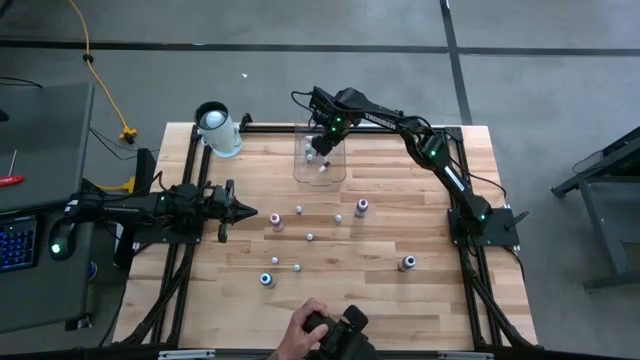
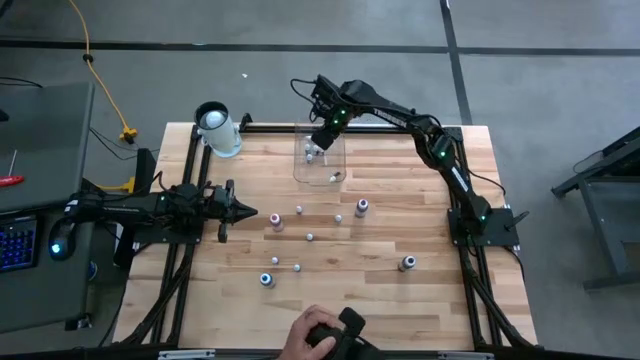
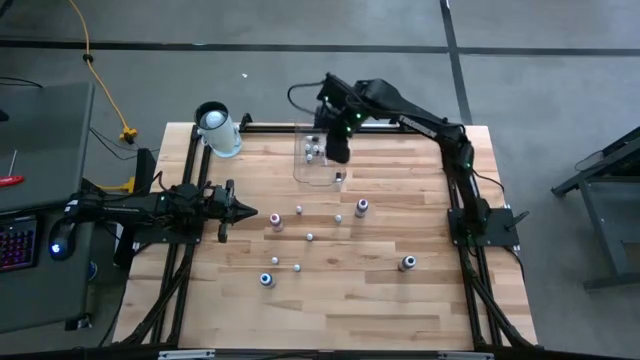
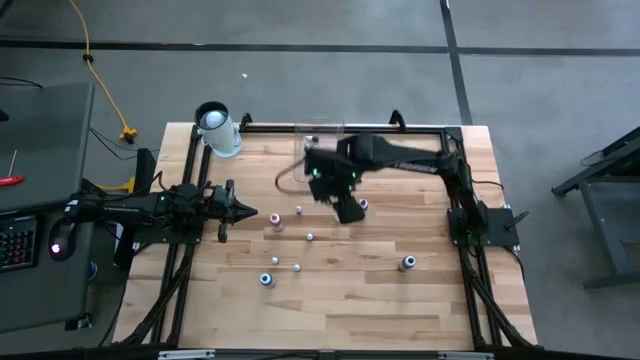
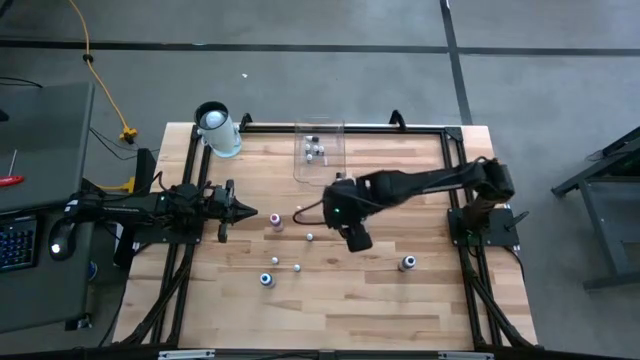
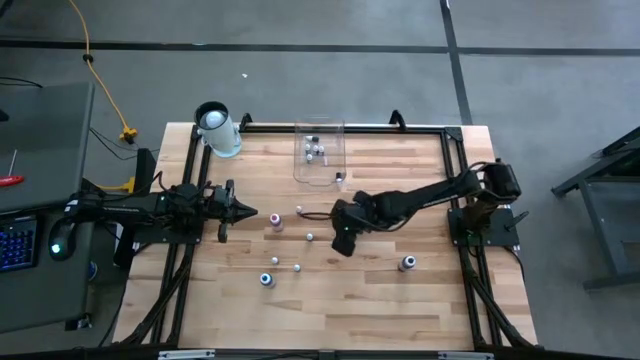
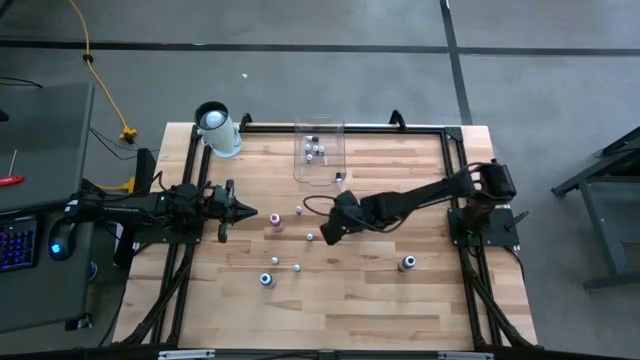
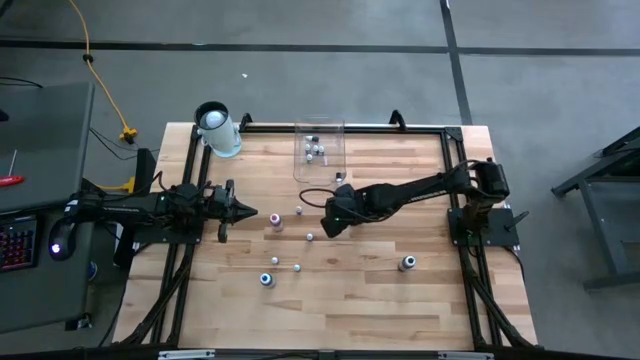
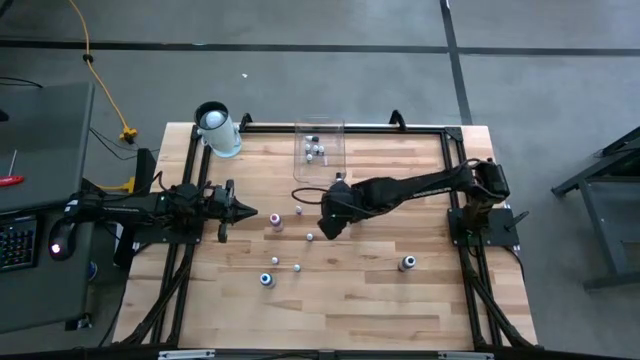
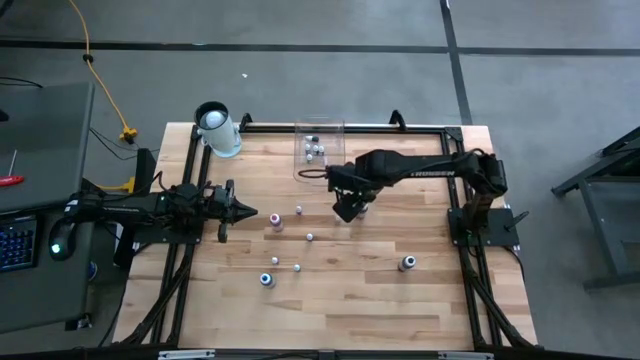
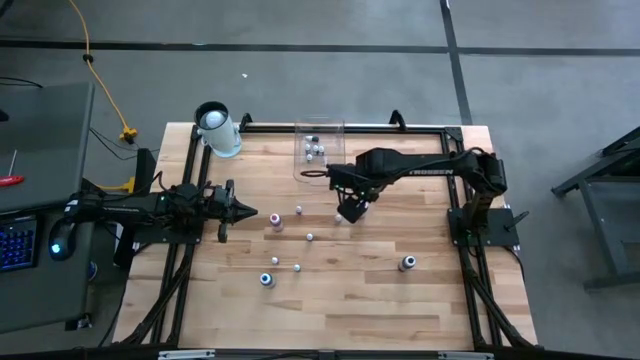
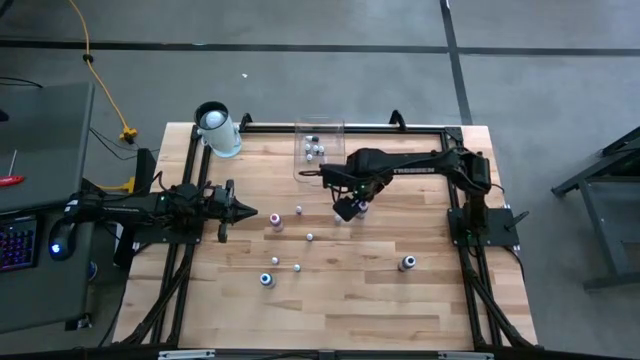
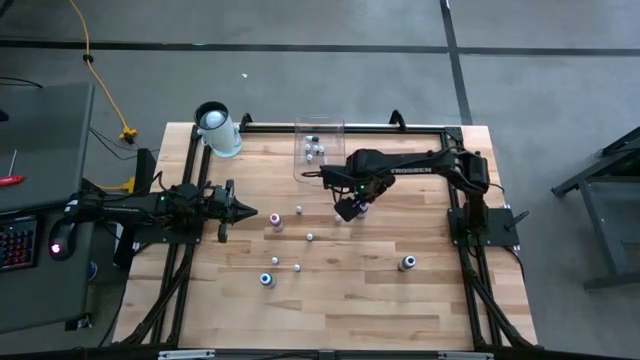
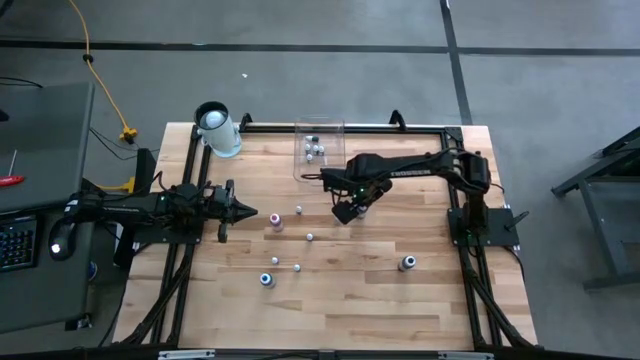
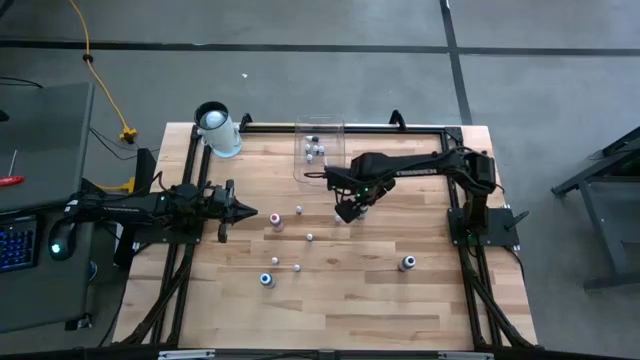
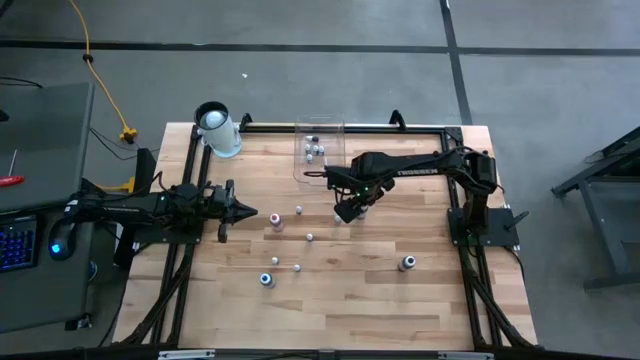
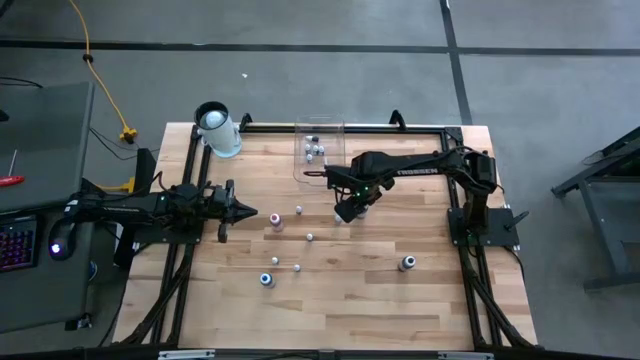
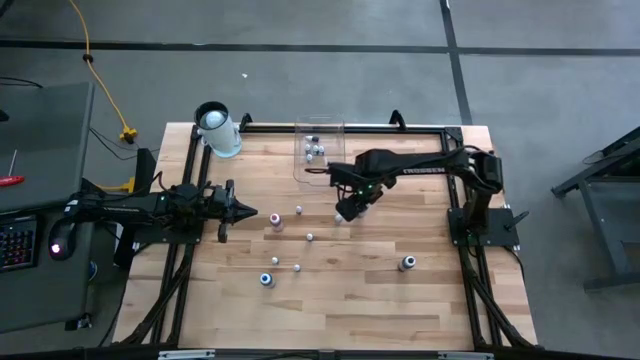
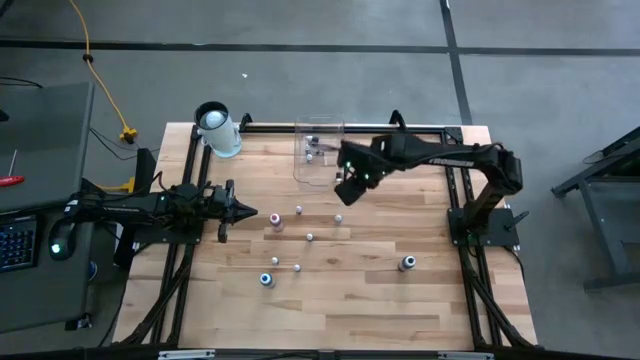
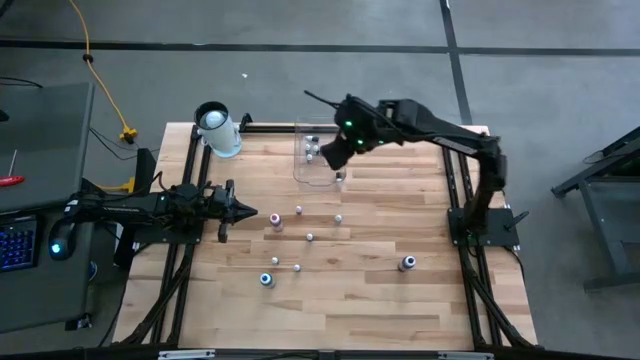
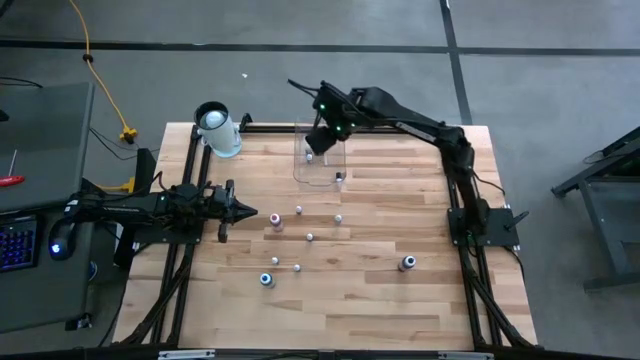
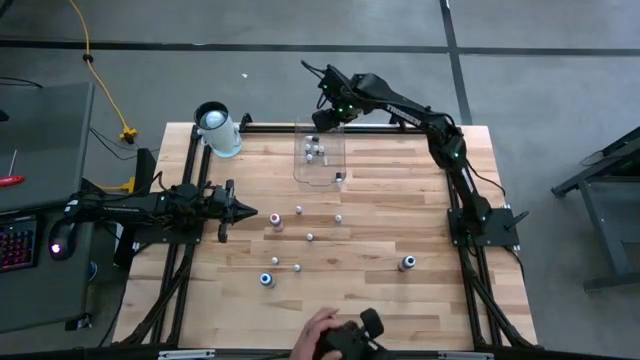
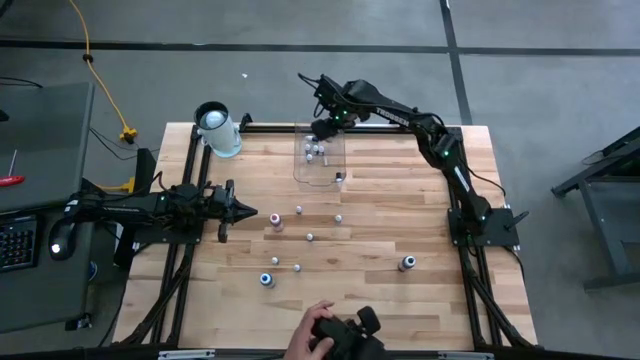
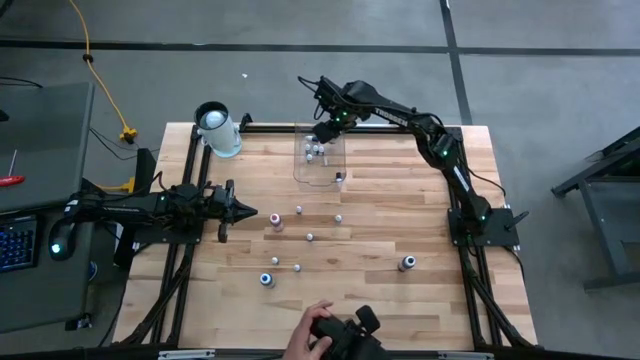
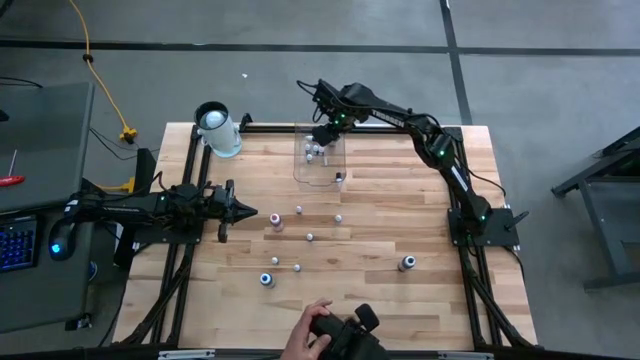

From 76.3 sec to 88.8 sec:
Task: Pick & Place food coloring
Put the large violet food coloring bottle into the container

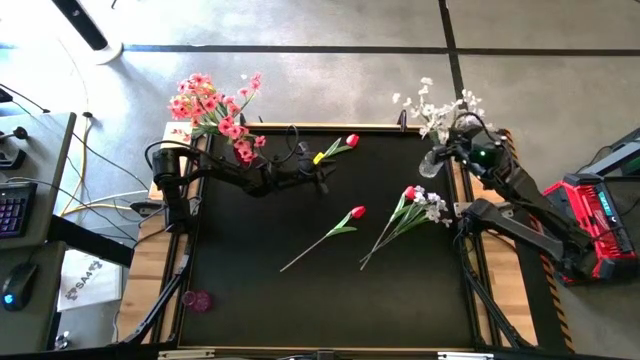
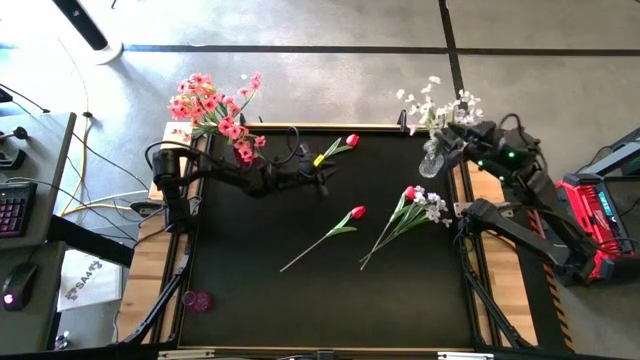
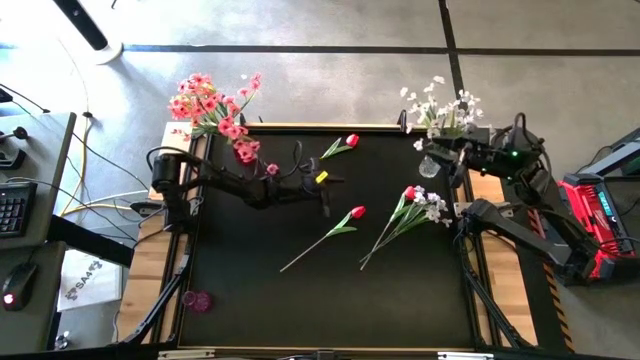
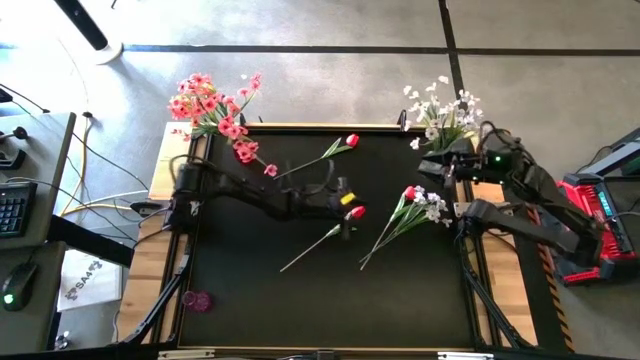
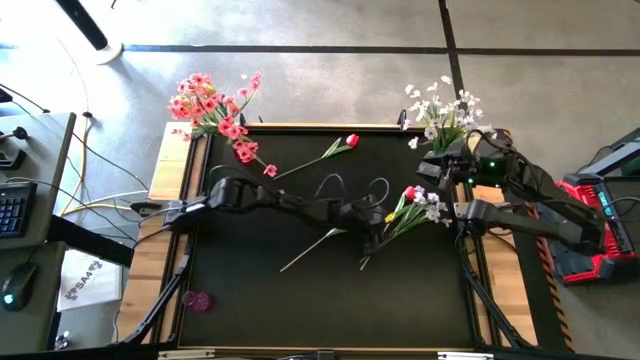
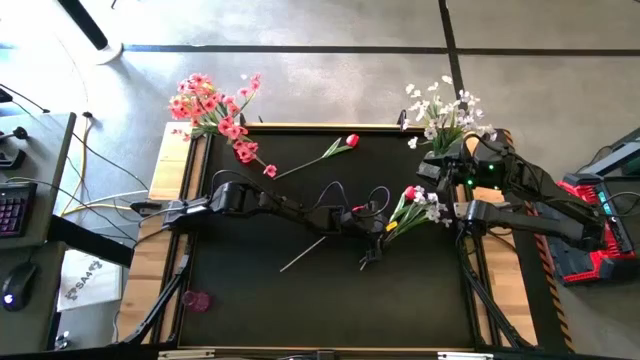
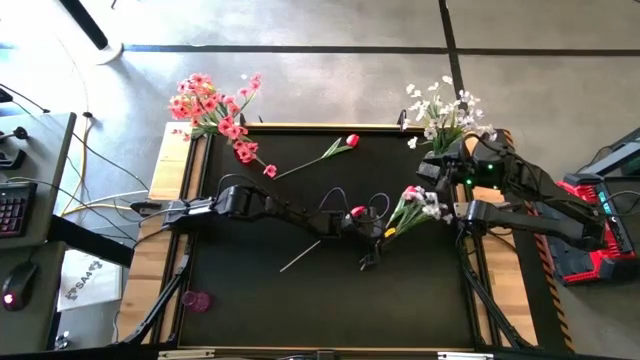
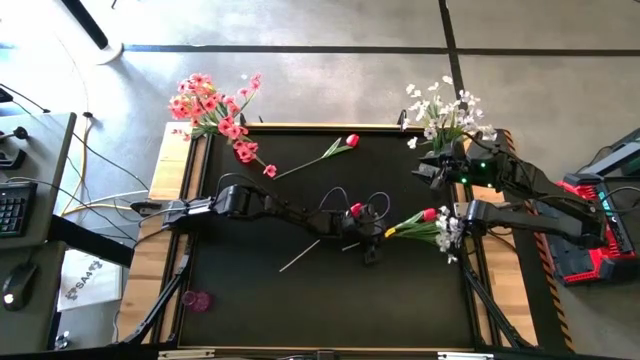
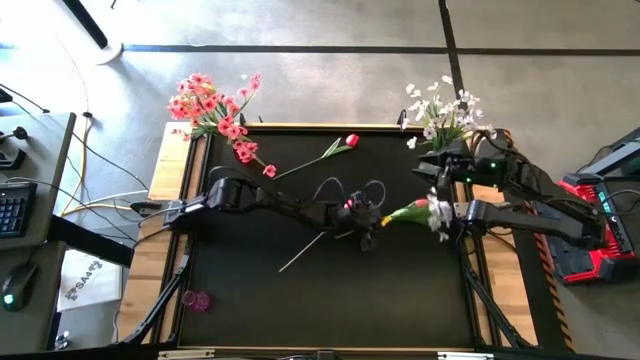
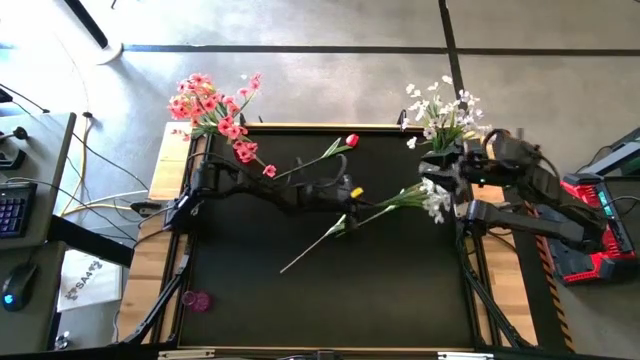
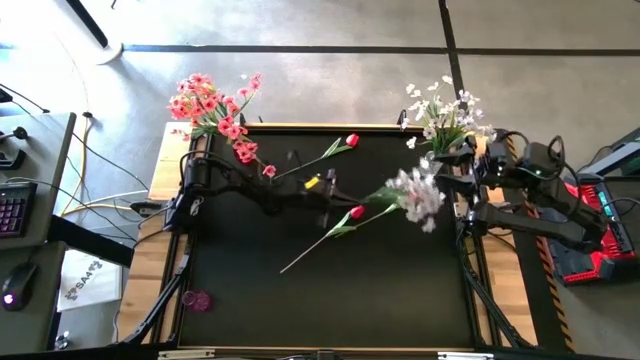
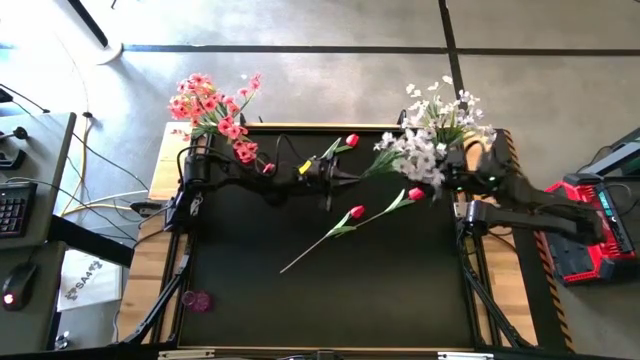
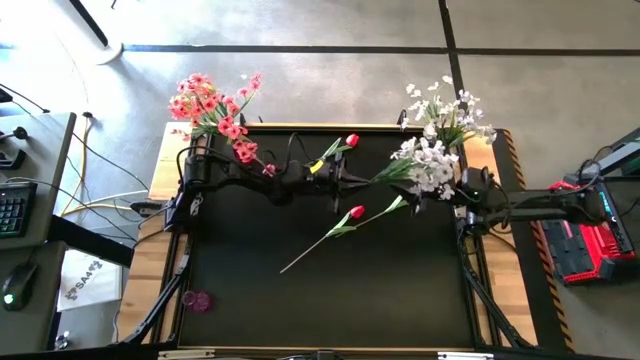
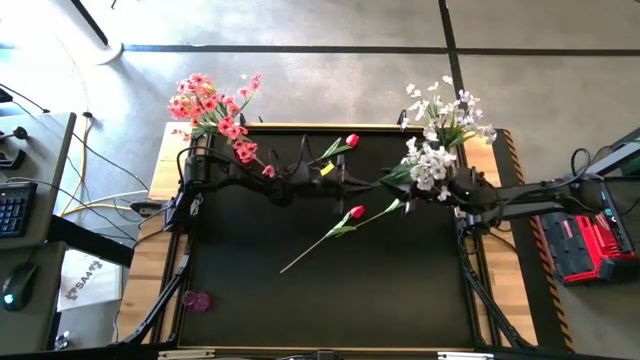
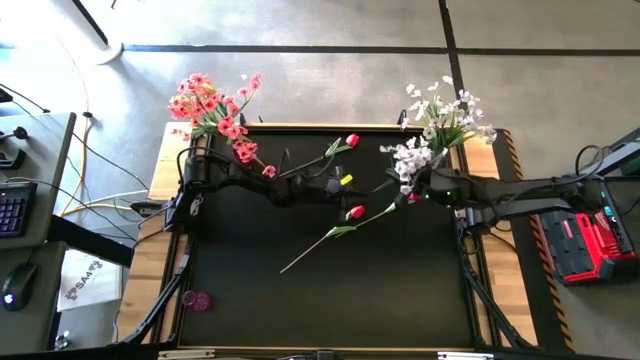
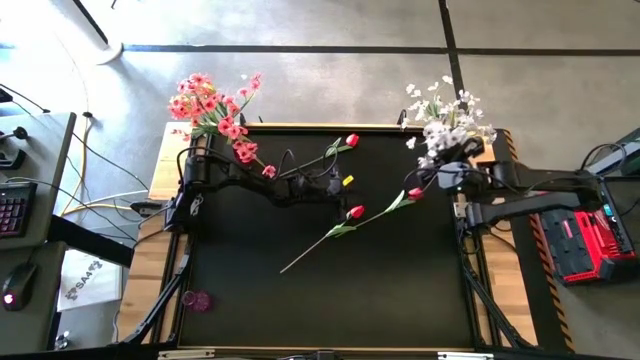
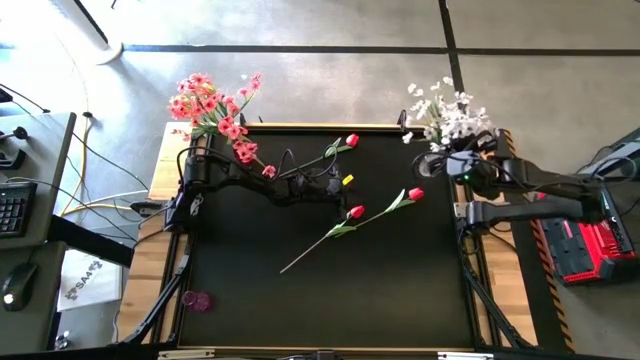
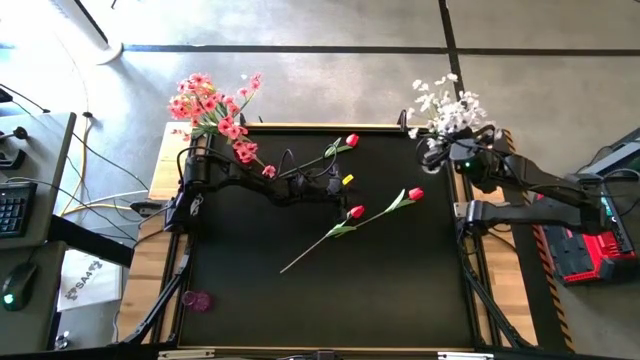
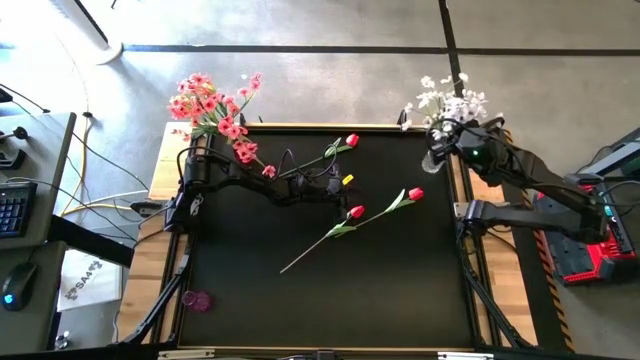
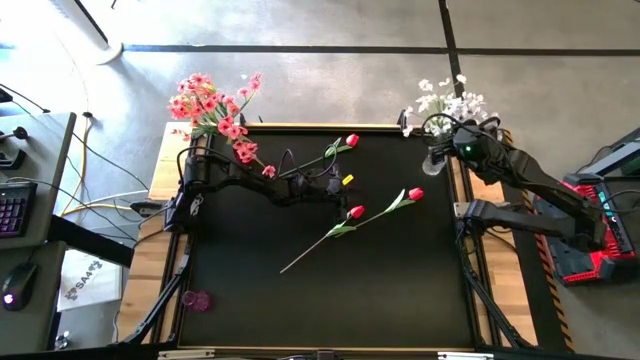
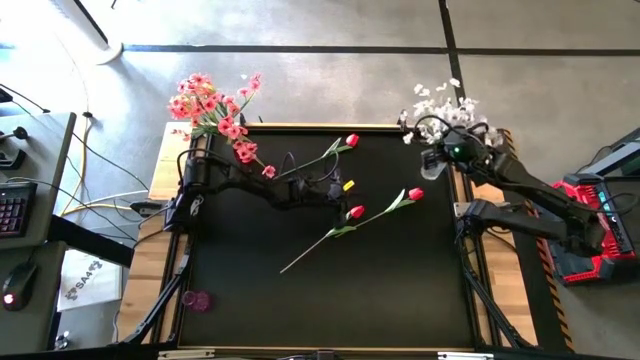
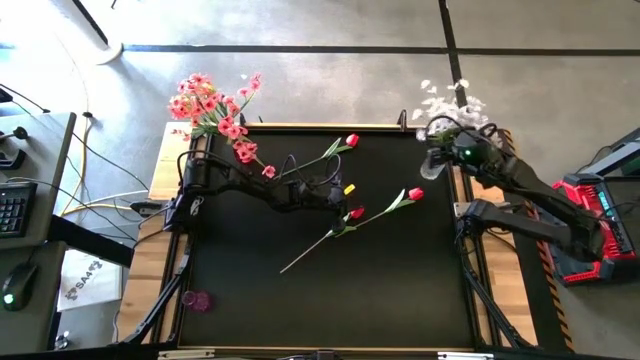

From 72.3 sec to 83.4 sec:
Task: Sort flowers into vase by color
Put the white flowers into the transparent vase
